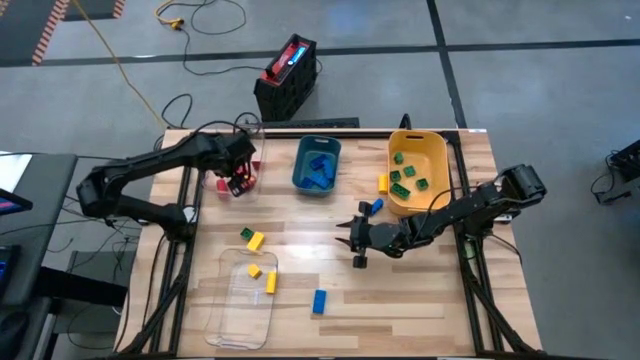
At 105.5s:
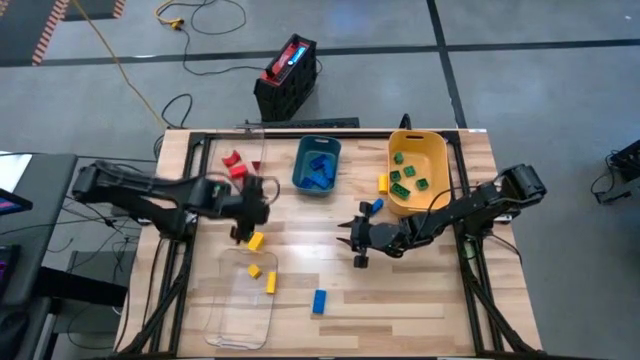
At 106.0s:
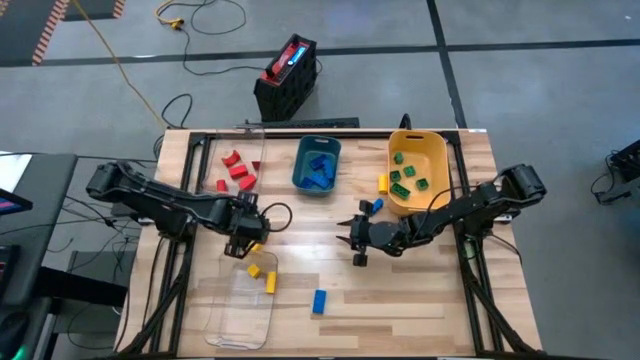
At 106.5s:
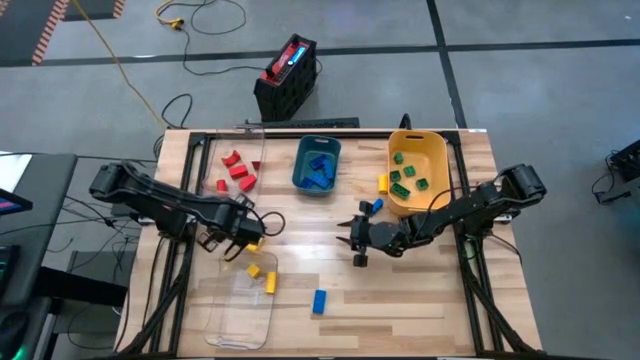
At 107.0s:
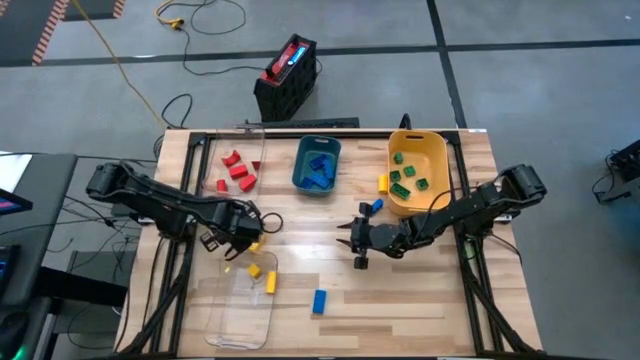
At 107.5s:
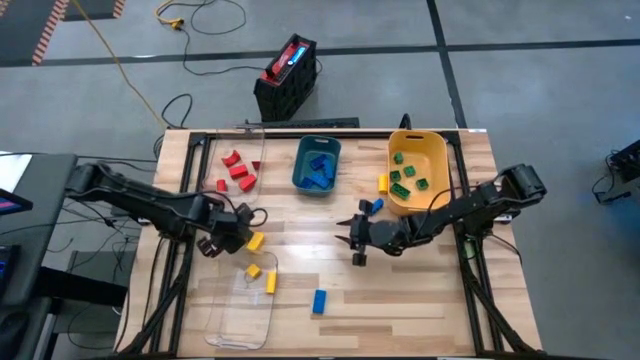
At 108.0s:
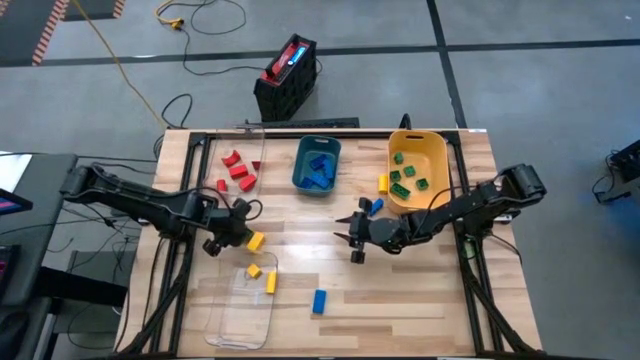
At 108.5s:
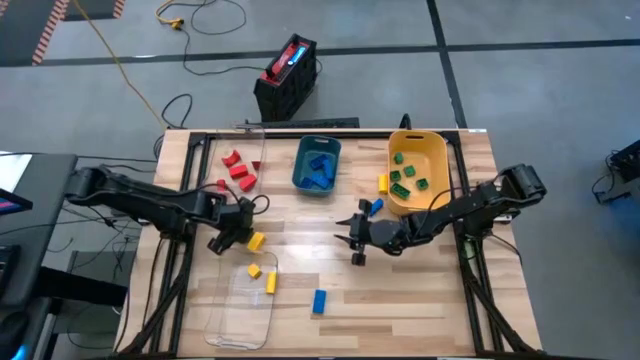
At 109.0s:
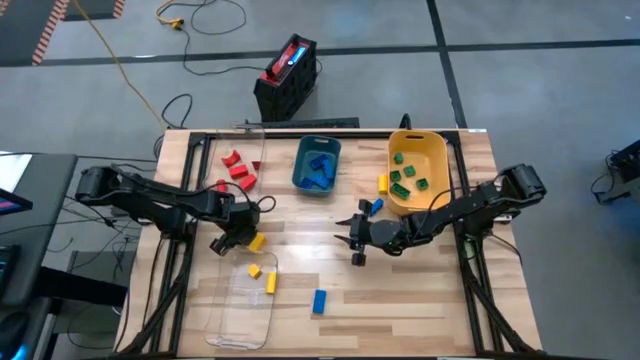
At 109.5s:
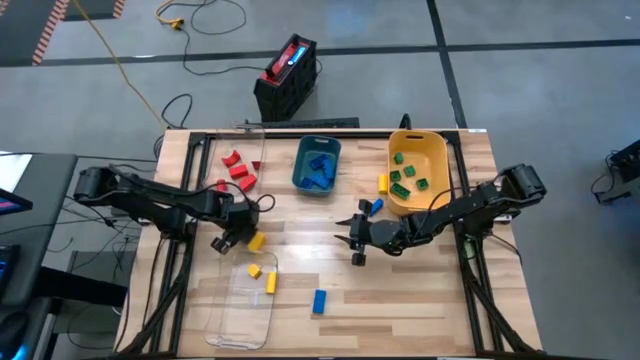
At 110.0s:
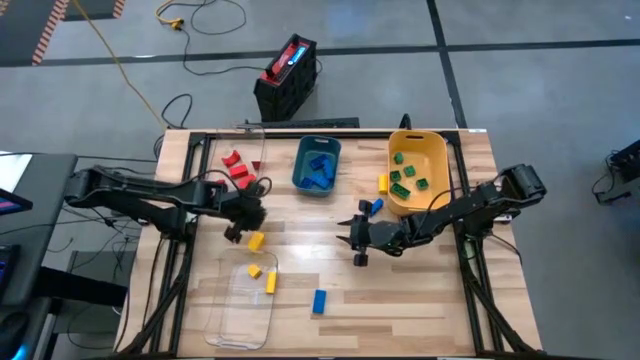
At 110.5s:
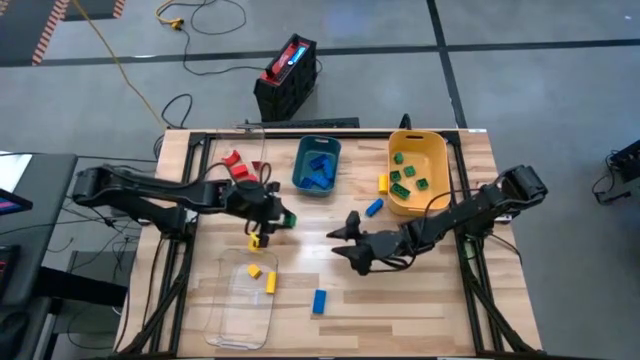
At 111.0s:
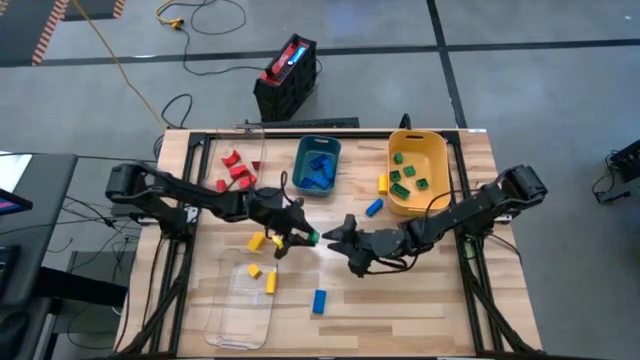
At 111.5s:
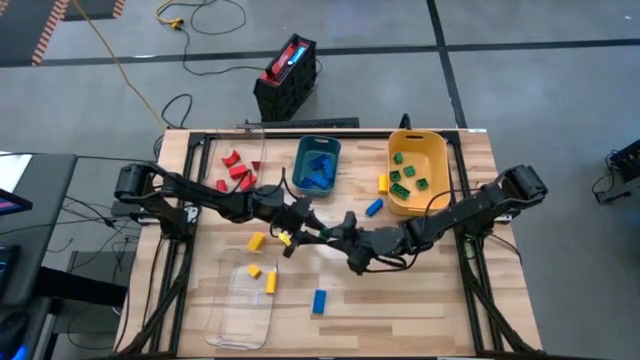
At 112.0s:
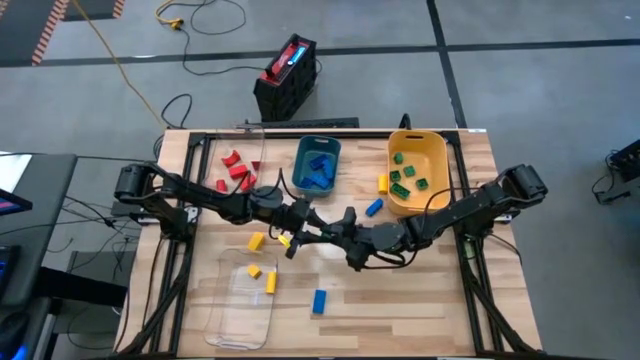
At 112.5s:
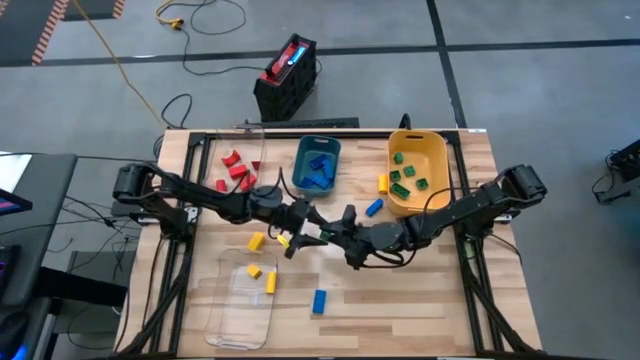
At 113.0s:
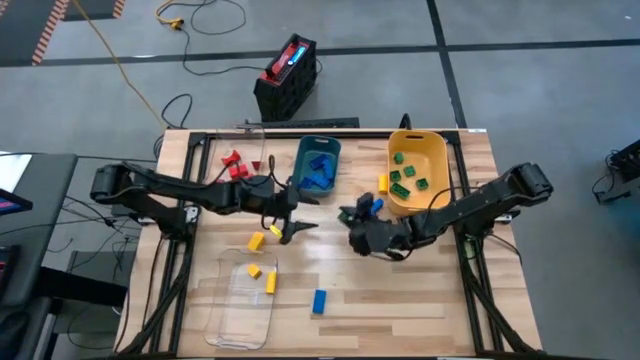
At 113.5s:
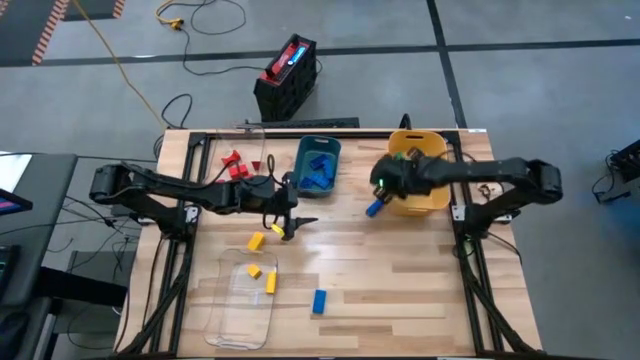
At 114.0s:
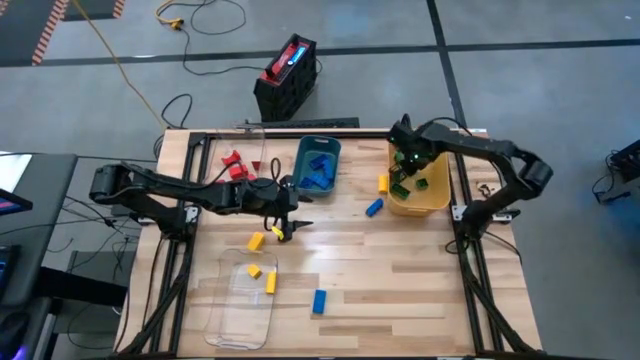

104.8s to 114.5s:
Task: Sort blocks
Put the green game piece into the yellow bin

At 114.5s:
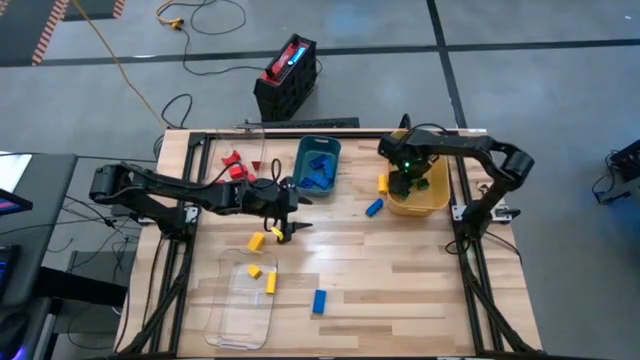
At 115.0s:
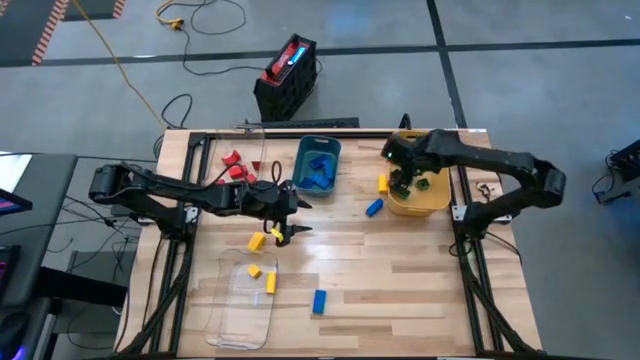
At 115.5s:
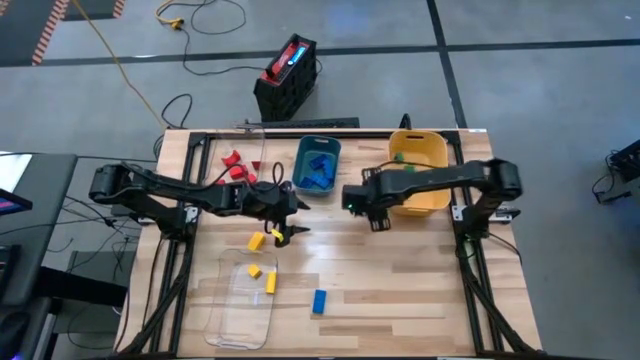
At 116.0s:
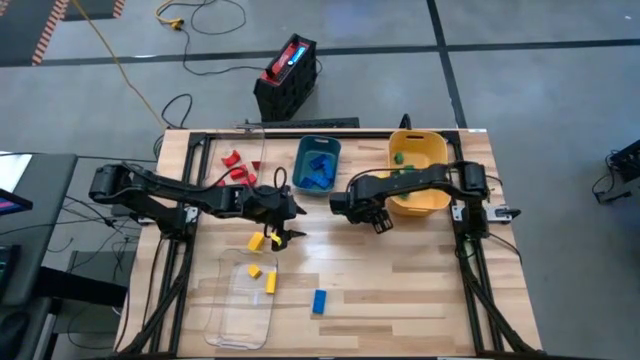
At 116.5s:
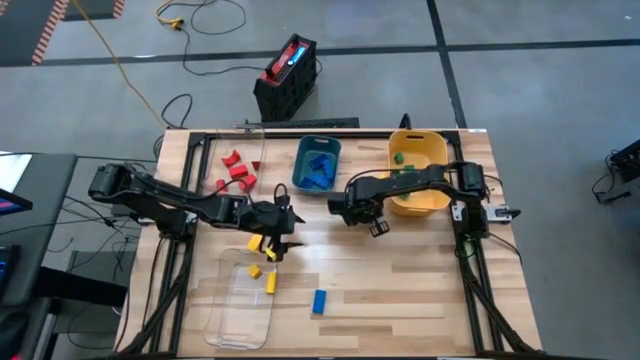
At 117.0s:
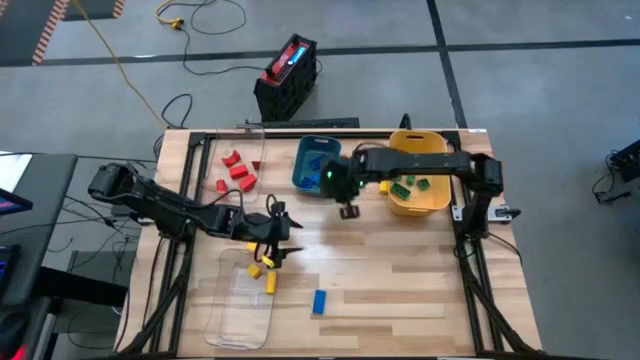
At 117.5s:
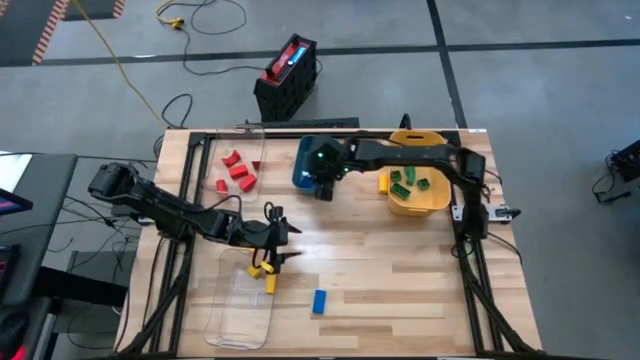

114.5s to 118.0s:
Put the blue game piece into the blue bin

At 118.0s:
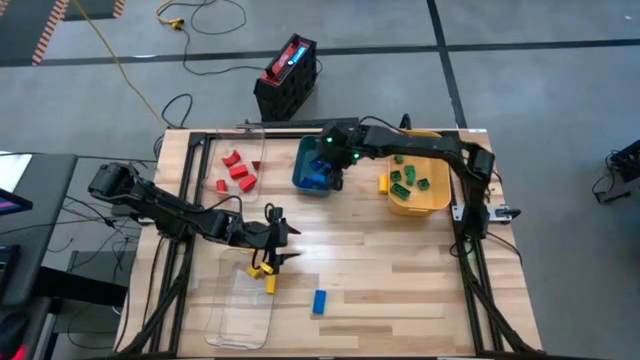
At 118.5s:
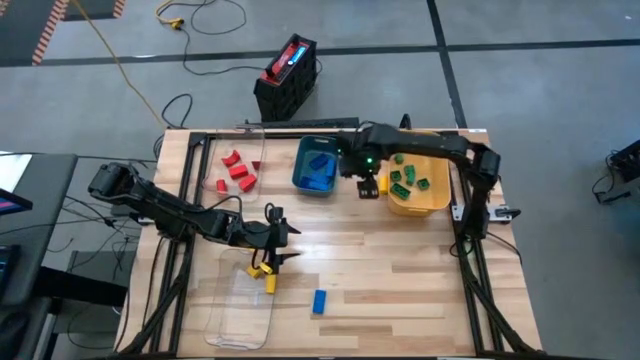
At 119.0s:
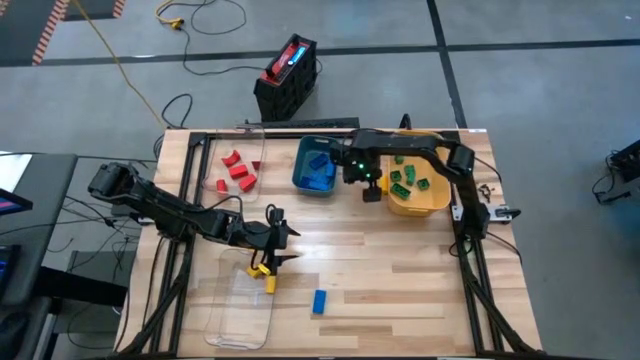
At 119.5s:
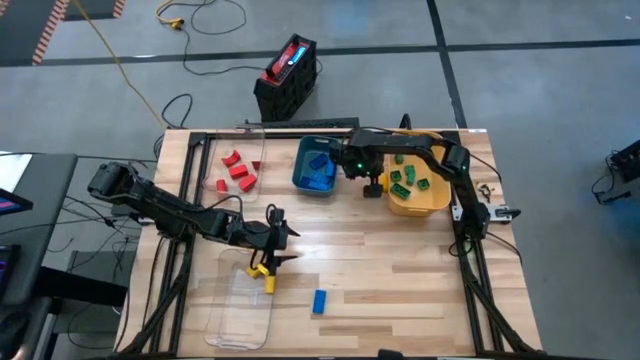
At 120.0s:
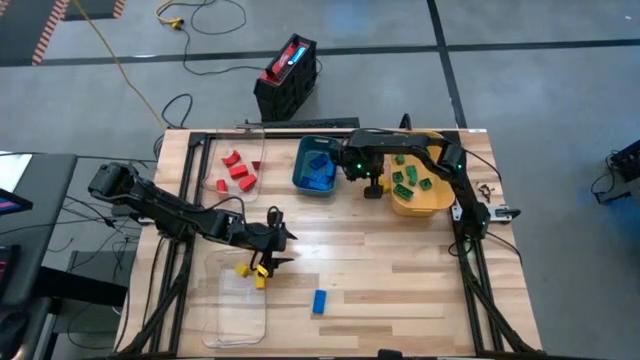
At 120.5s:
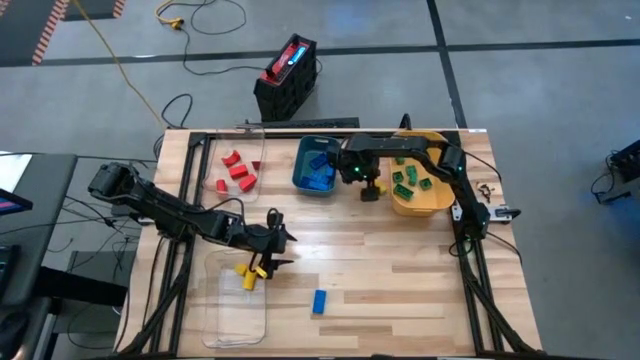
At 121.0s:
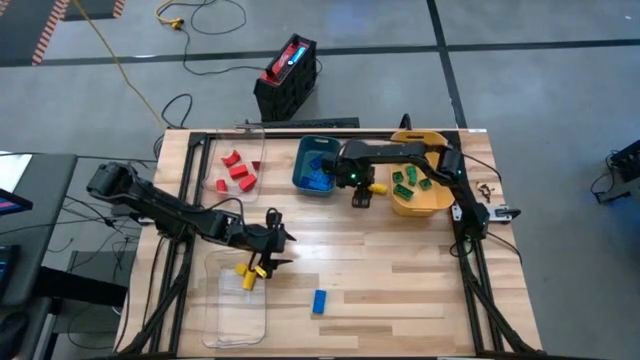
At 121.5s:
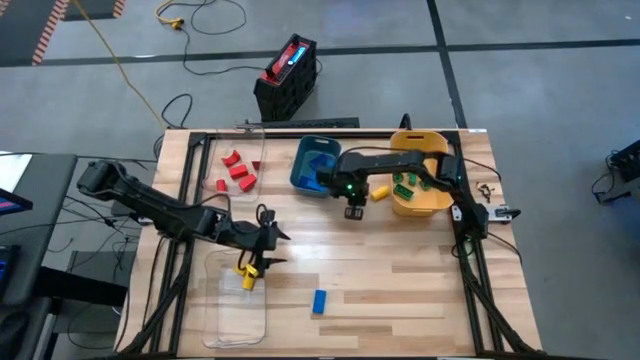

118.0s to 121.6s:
Put the yellow block into the bottom transparent bin

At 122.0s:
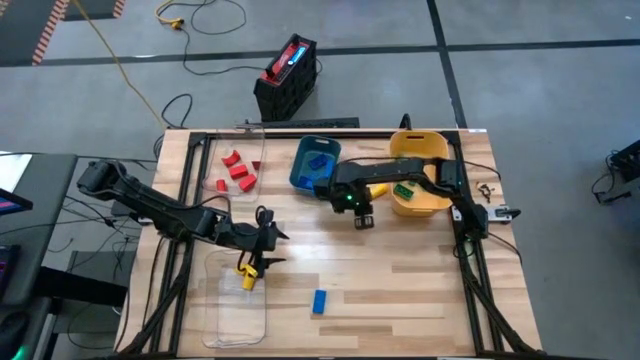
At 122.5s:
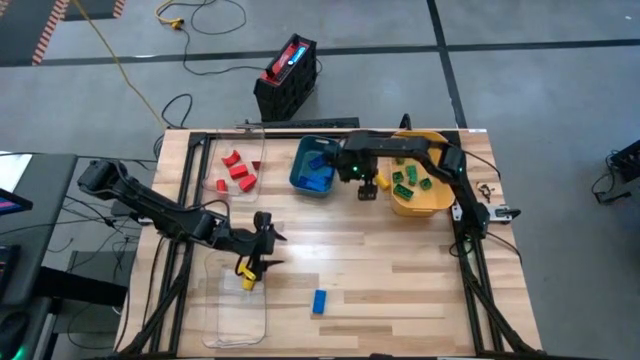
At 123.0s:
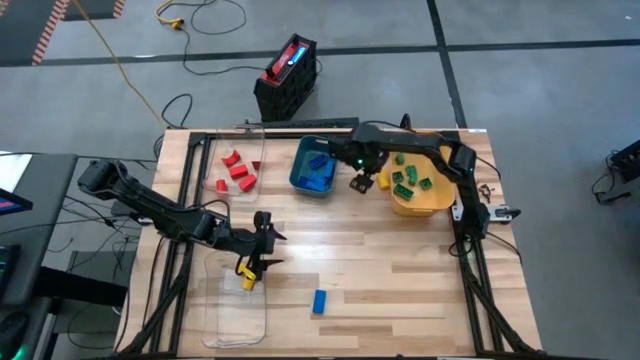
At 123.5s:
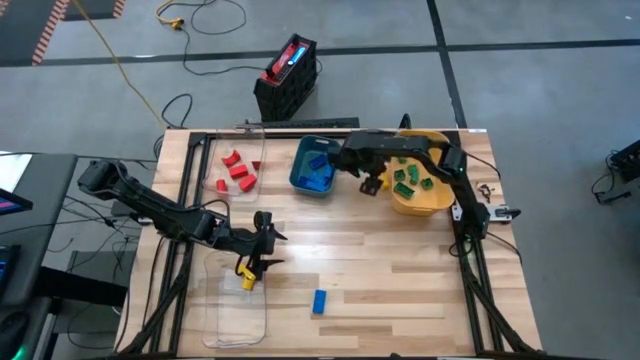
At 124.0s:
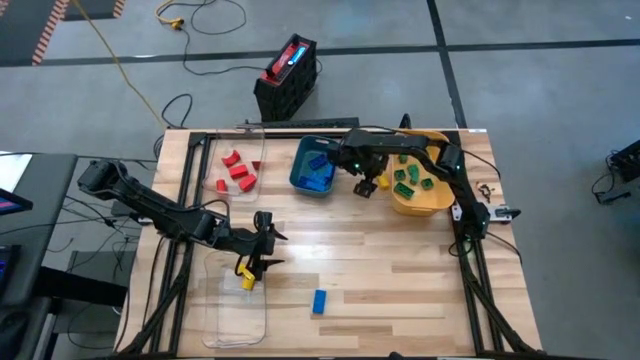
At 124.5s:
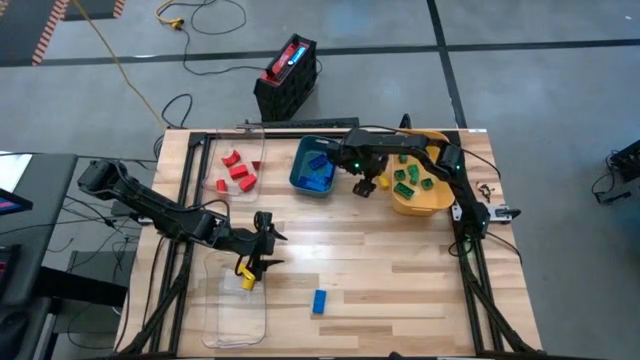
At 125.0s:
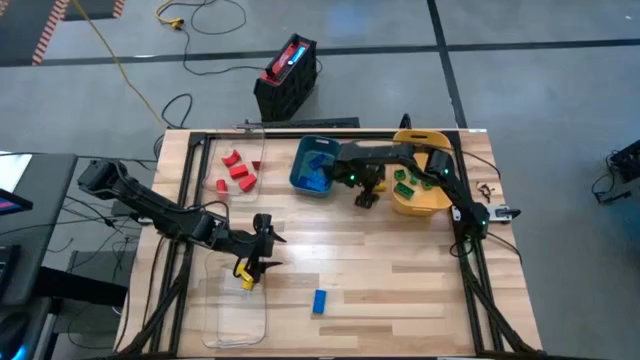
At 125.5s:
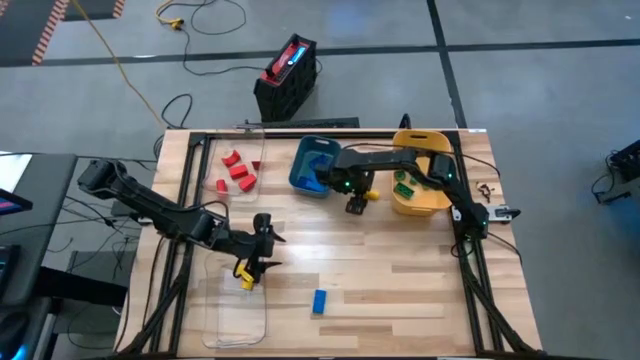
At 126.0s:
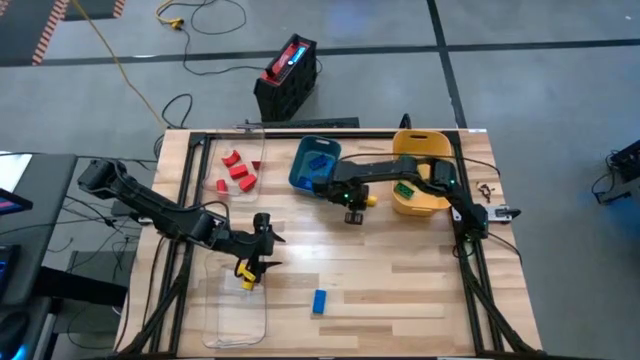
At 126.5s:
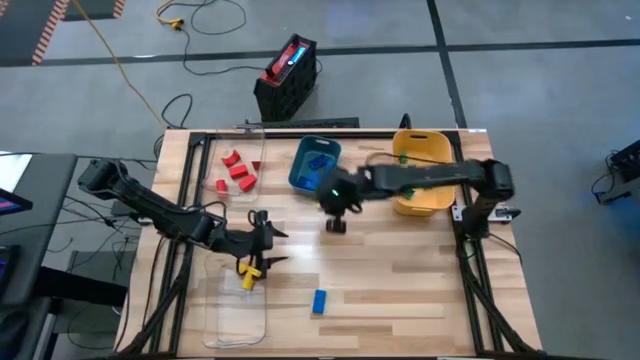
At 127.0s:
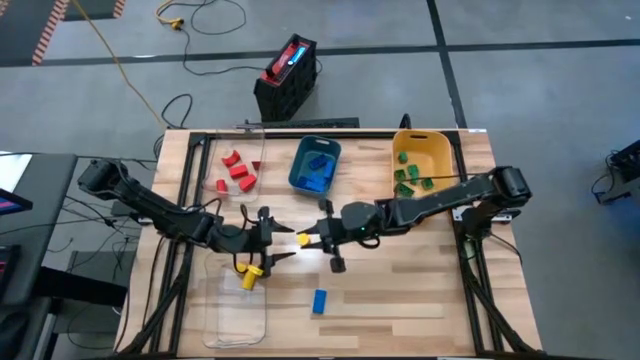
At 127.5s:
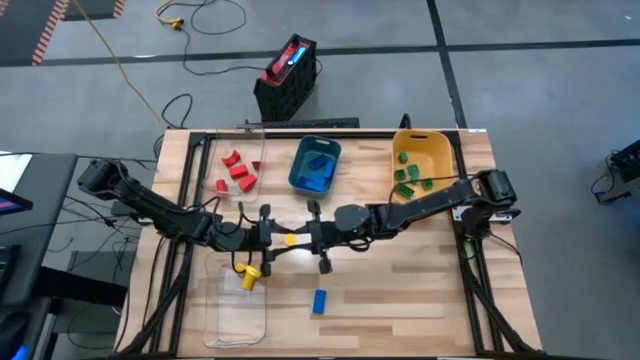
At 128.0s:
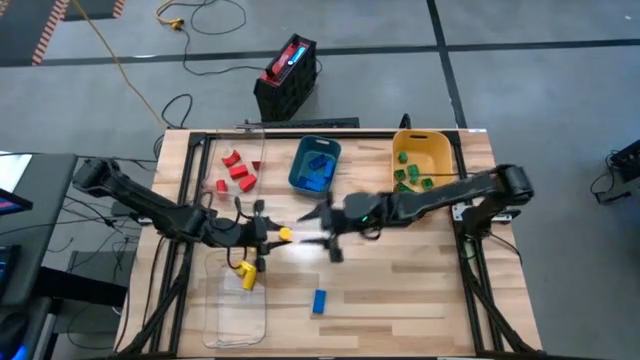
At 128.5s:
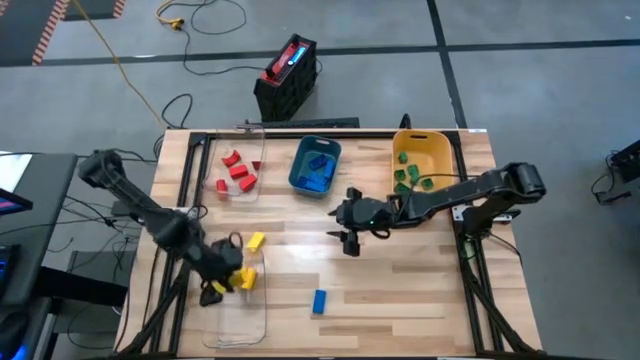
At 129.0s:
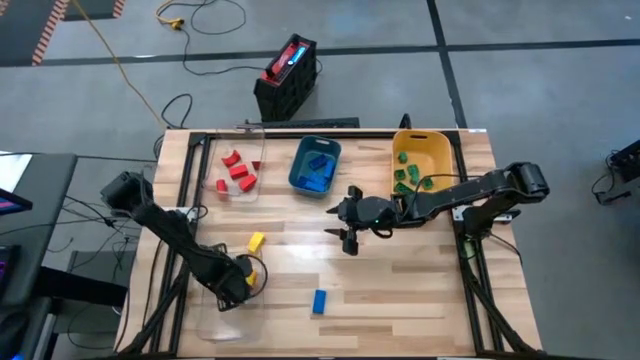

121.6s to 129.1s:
Put the yellow block into the bottom transparent bin
